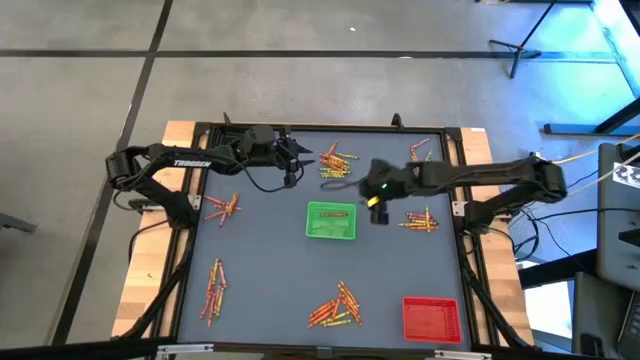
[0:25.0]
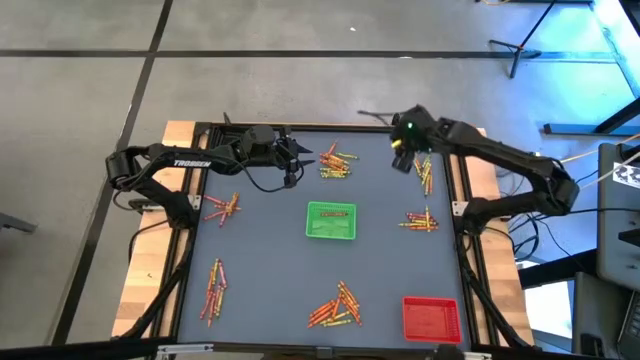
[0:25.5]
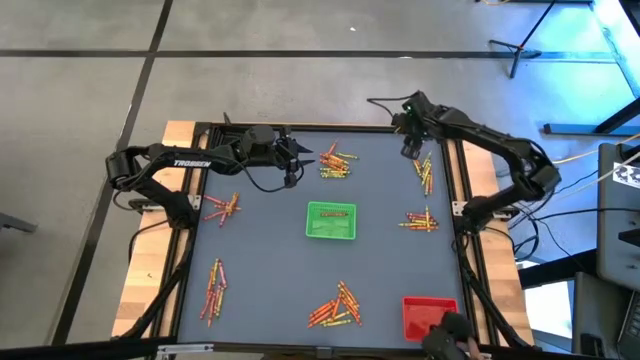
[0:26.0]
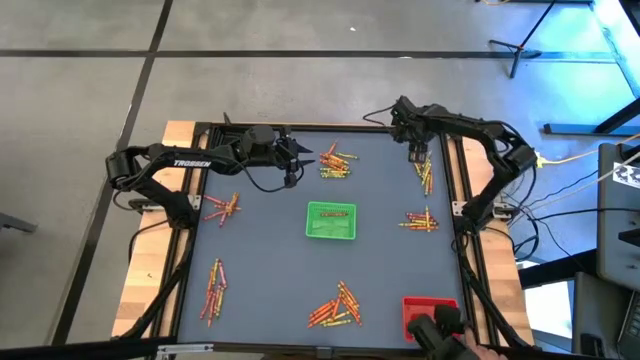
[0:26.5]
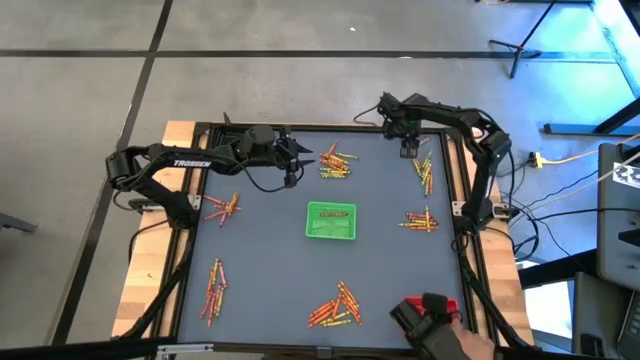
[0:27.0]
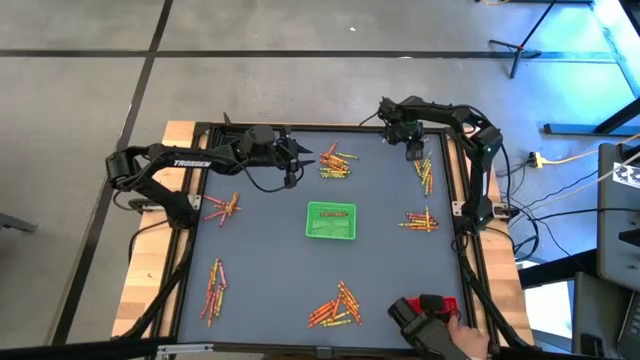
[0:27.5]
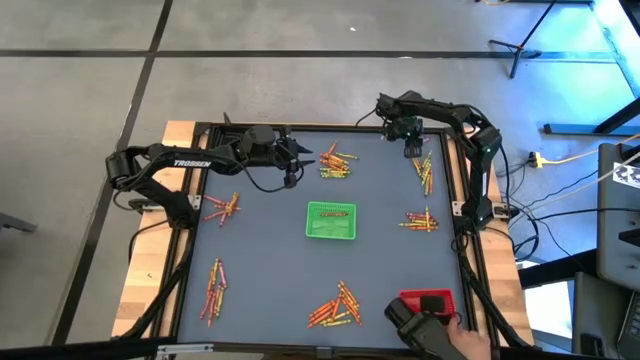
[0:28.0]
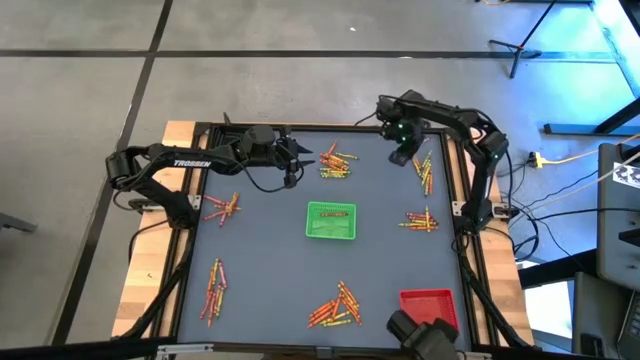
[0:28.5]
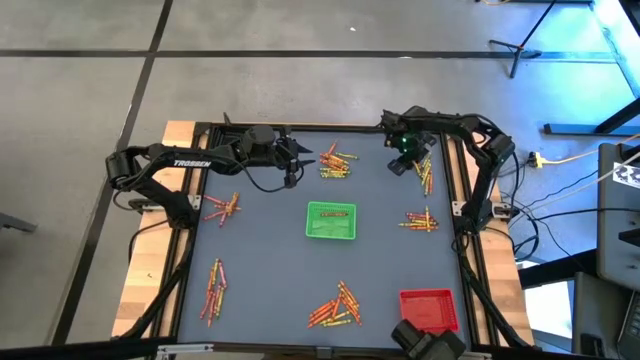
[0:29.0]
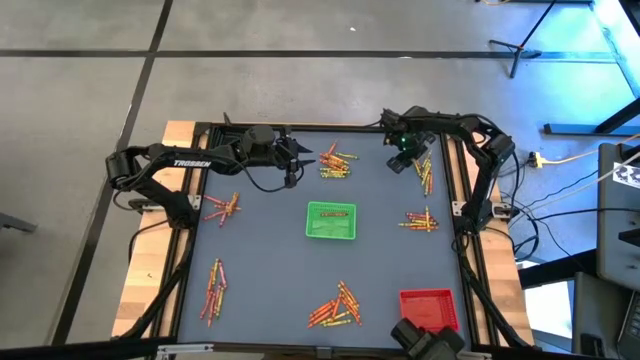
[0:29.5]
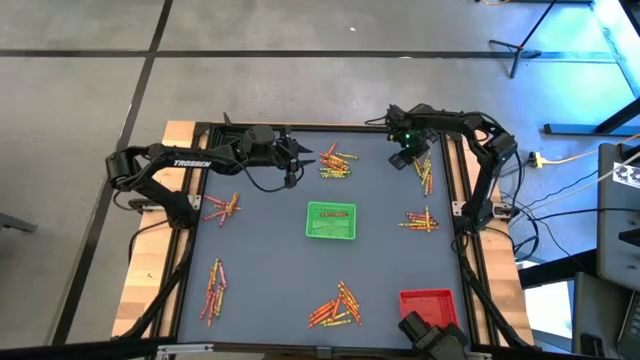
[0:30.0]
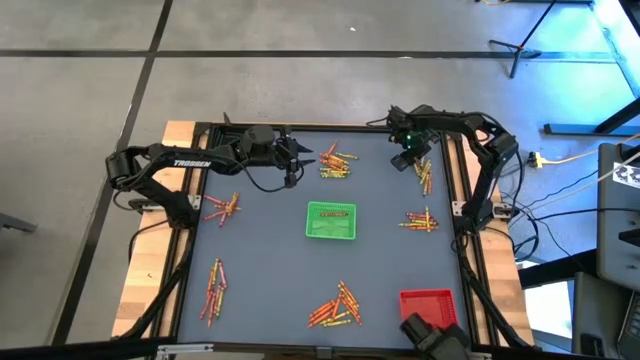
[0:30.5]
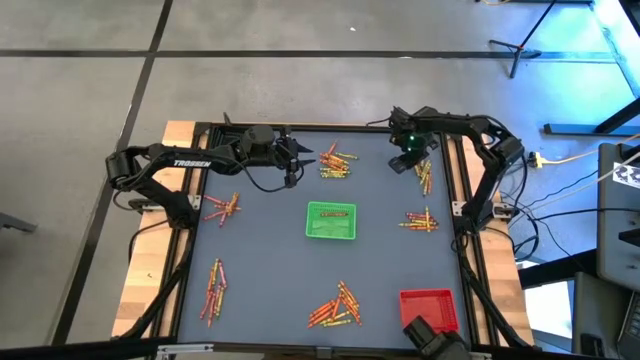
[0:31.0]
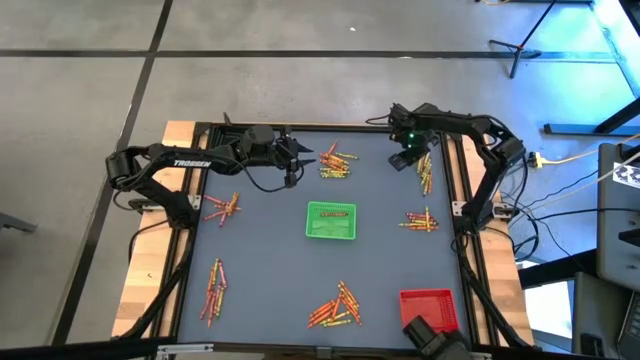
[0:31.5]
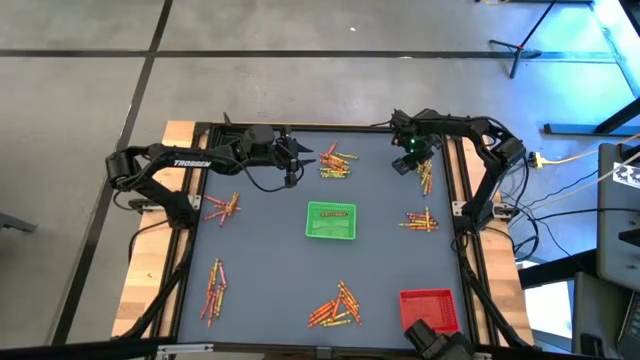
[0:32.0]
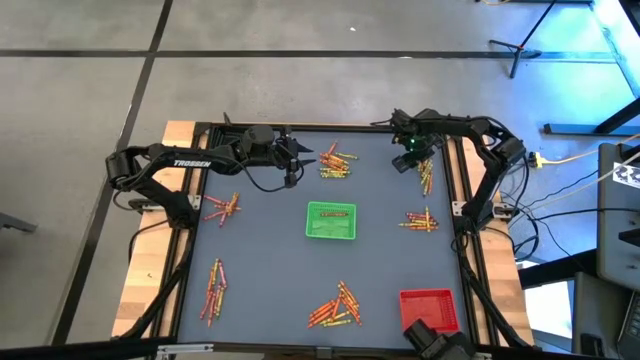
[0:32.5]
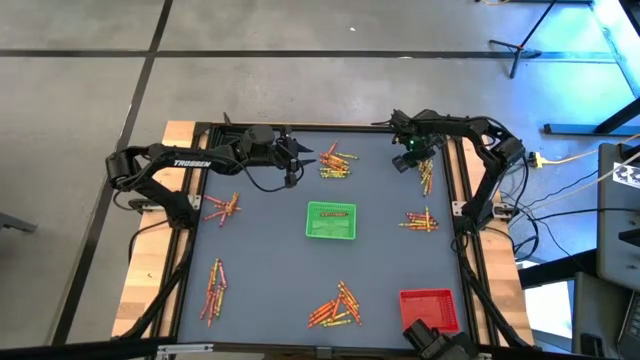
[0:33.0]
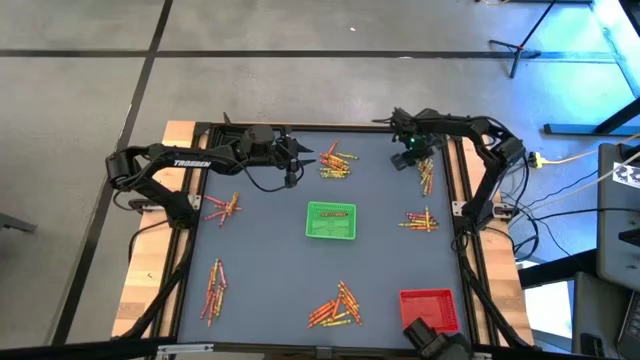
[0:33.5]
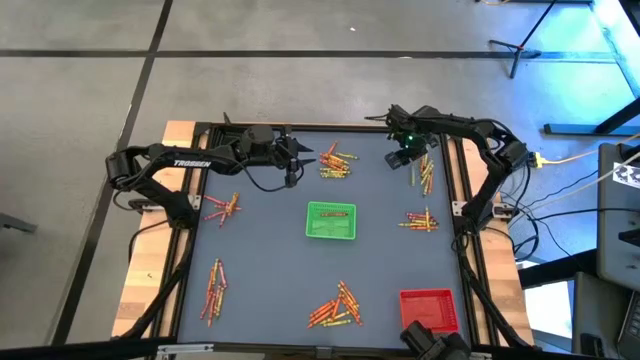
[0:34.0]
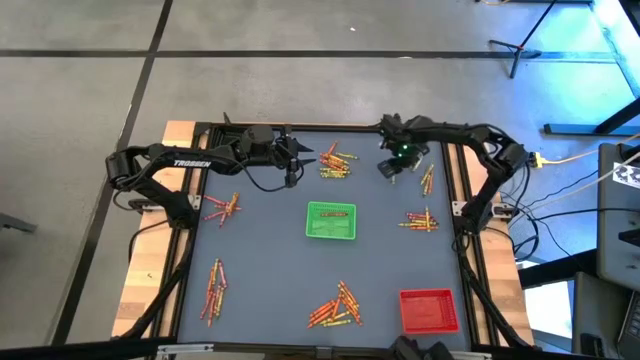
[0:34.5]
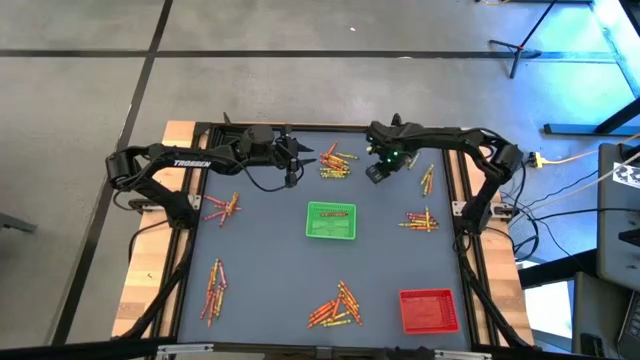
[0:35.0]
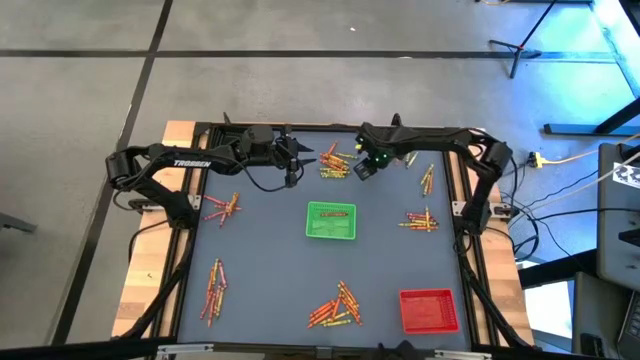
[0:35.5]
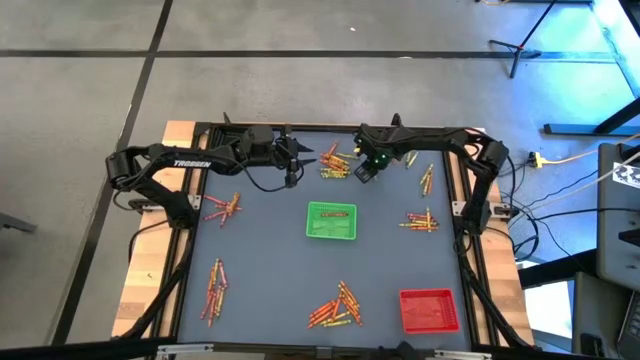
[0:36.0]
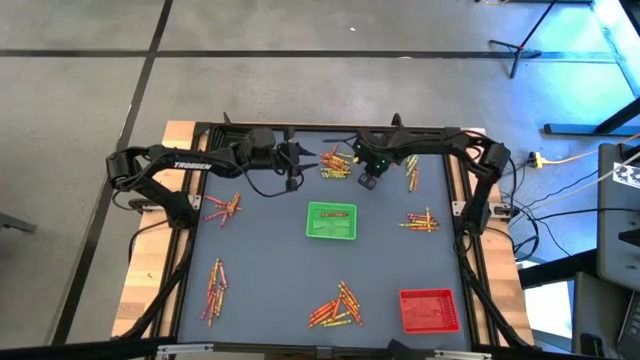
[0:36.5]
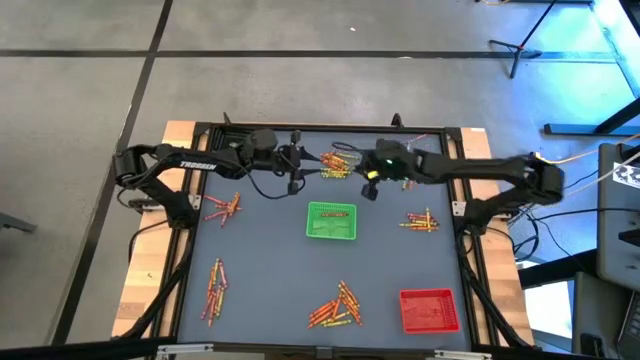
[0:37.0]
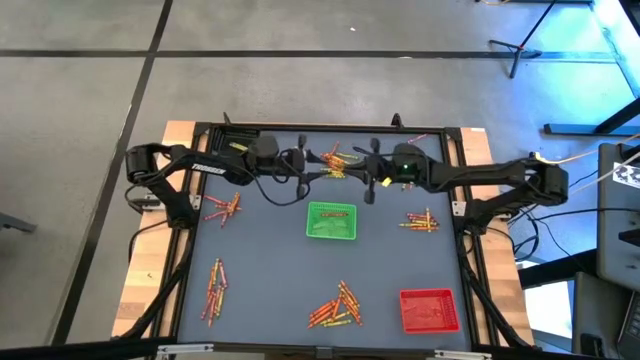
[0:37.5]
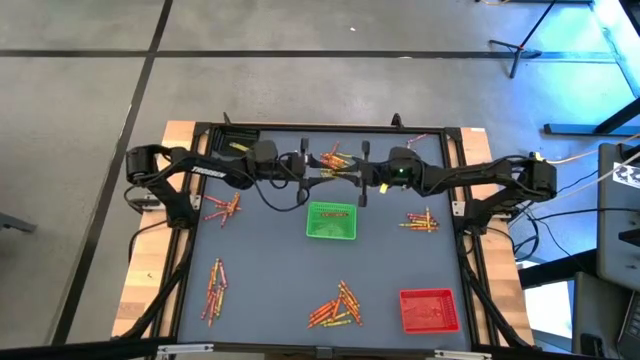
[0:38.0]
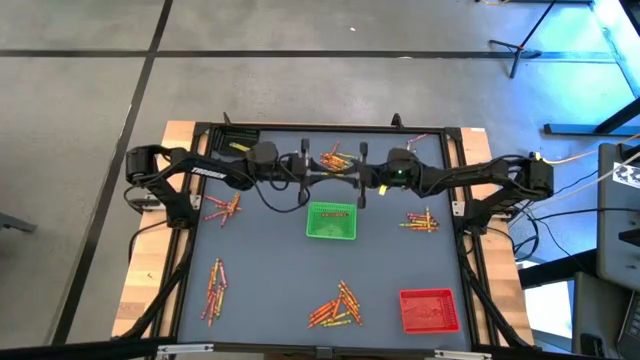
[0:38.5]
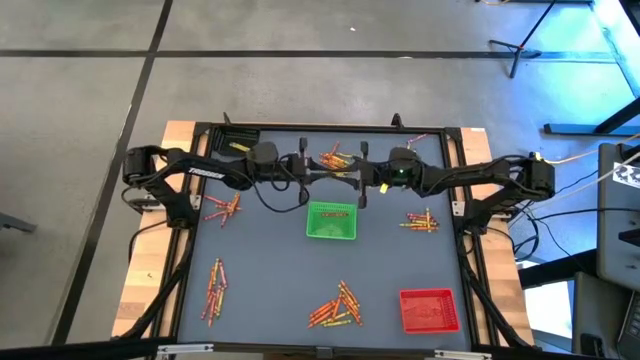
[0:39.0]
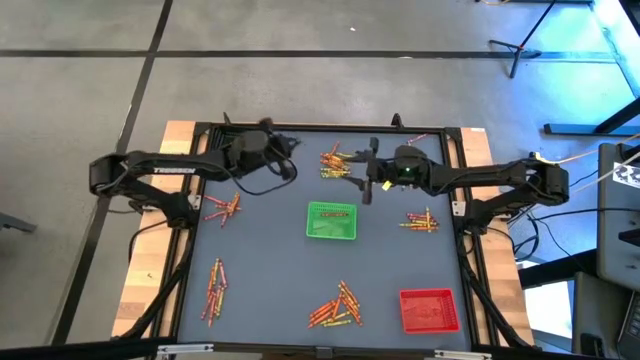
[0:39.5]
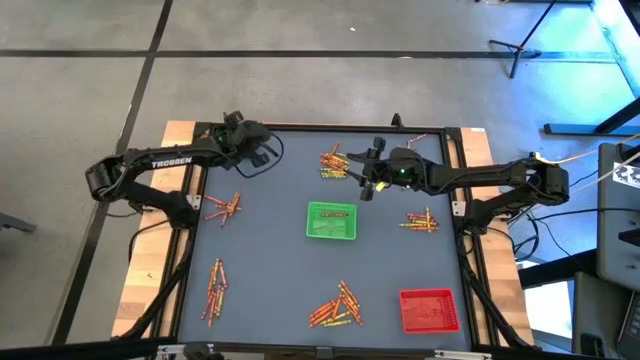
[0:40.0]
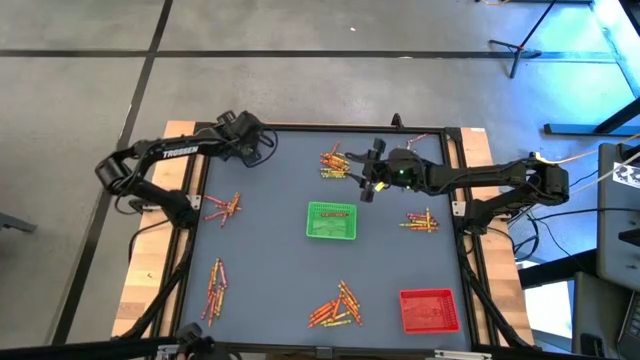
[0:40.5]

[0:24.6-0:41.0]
Task: Sort crayons
Put the green crayon into the black bin

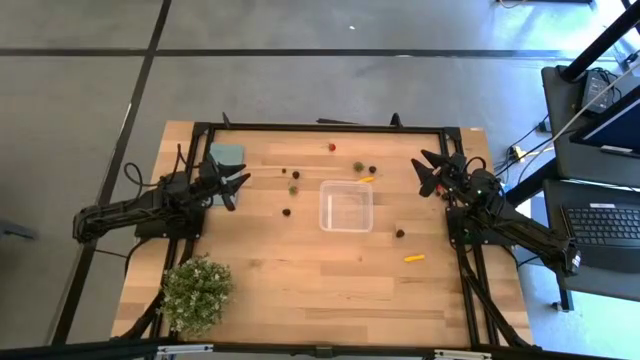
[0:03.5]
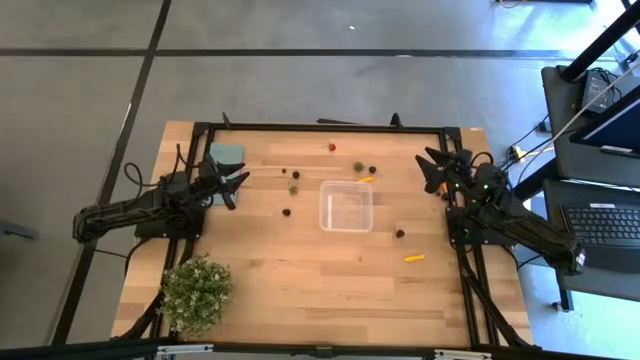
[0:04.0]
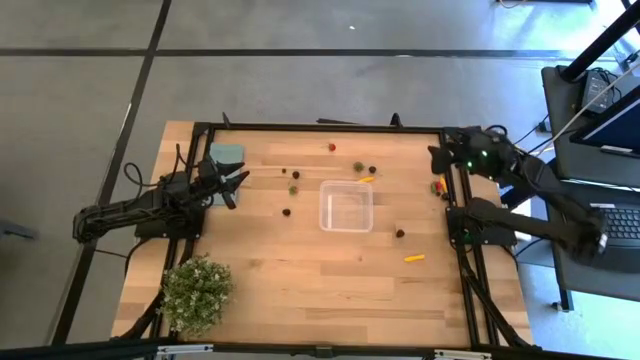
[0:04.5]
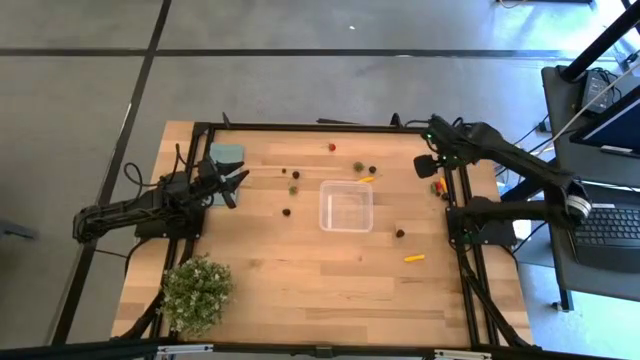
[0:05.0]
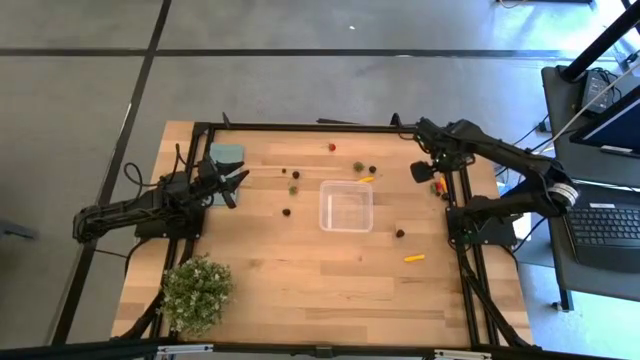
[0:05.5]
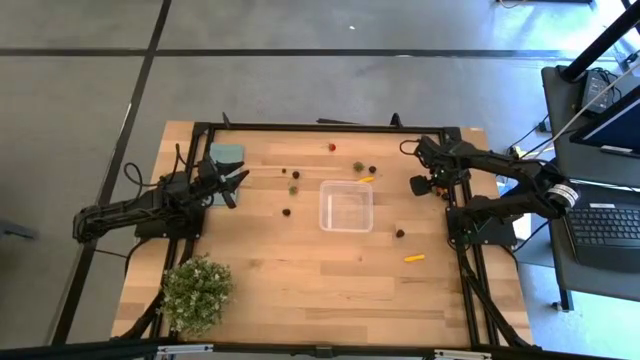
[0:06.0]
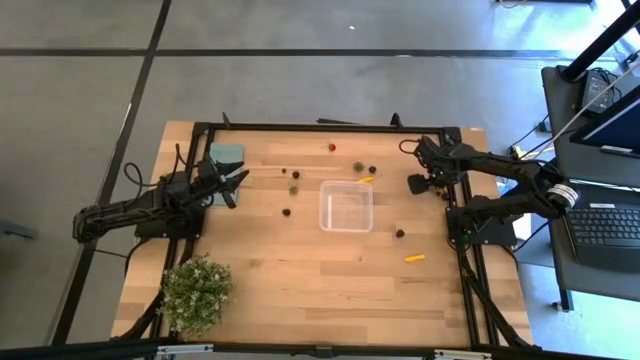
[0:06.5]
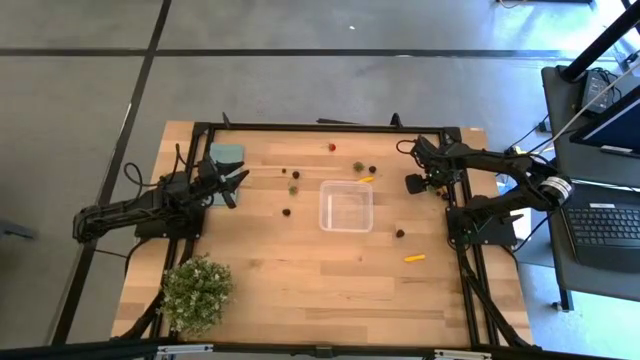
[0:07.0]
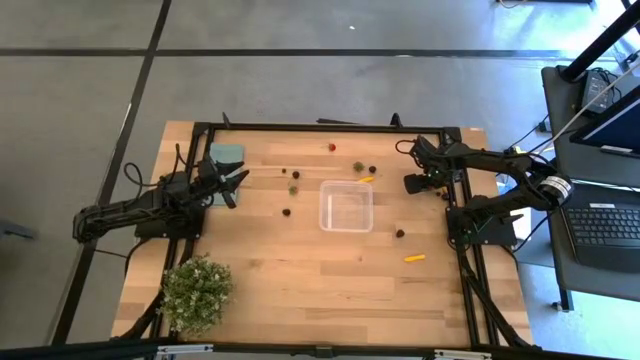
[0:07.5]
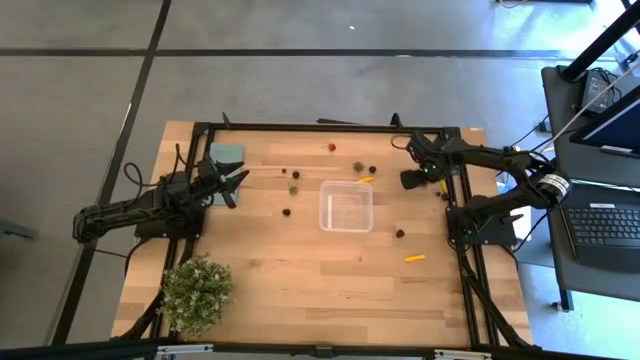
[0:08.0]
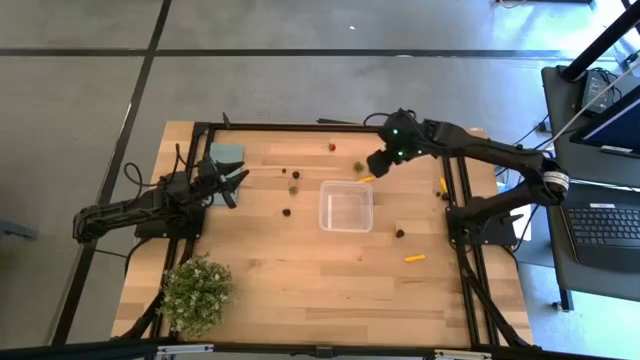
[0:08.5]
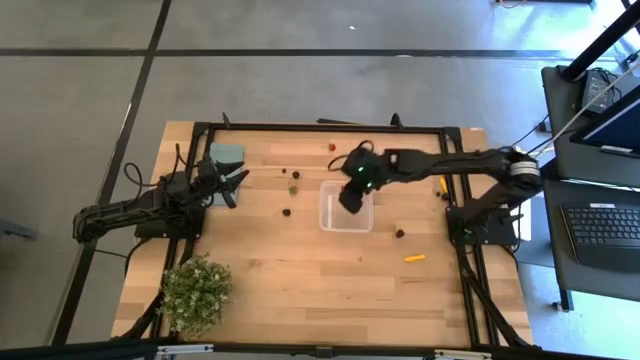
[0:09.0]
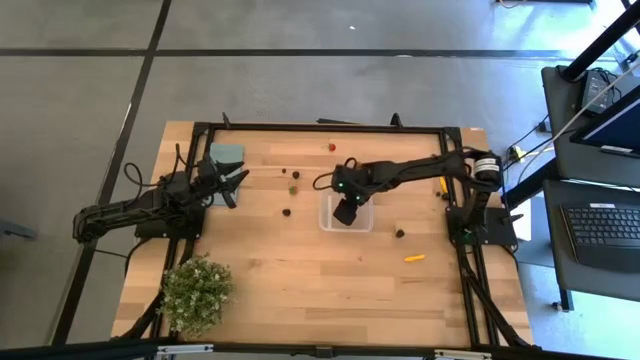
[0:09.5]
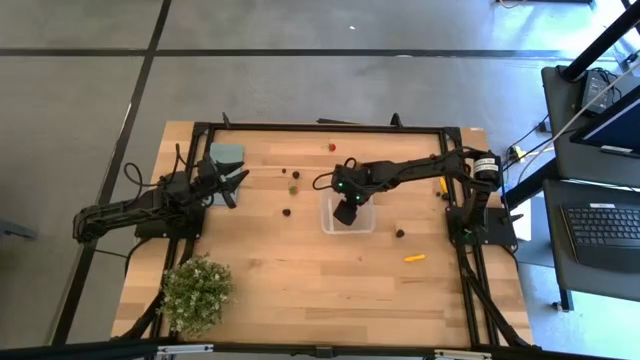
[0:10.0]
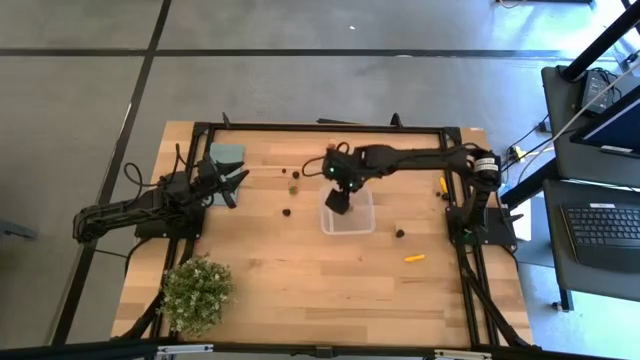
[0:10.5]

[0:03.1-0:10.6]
Task: Pick and placing Produce into tupperware
Put the right strawberry into the transparent bin
